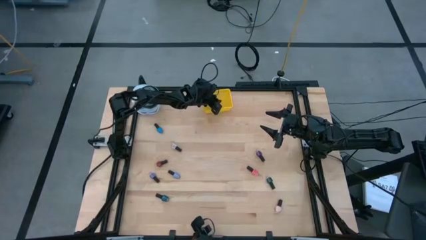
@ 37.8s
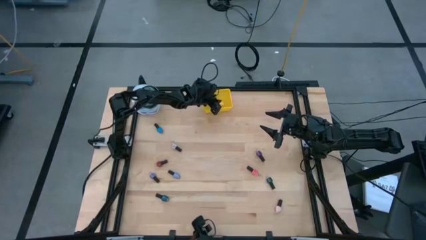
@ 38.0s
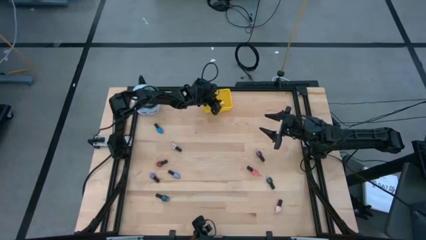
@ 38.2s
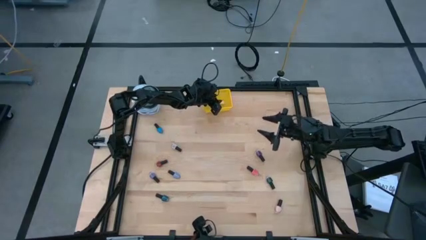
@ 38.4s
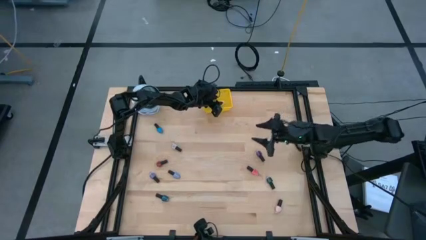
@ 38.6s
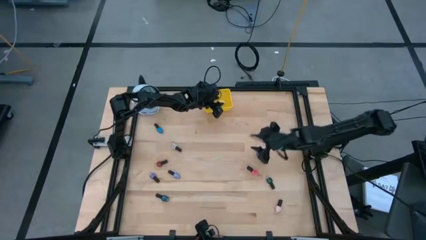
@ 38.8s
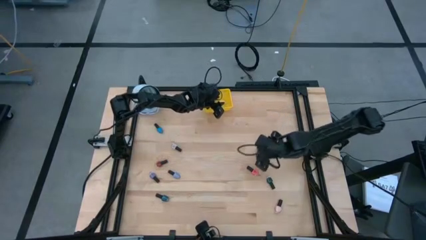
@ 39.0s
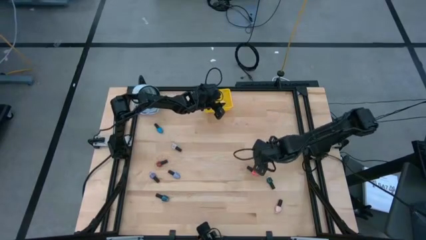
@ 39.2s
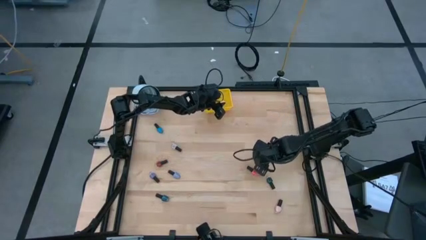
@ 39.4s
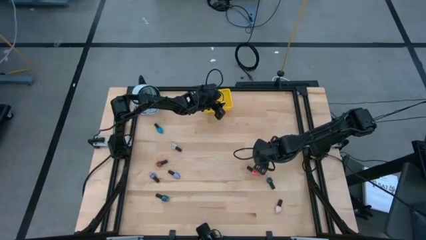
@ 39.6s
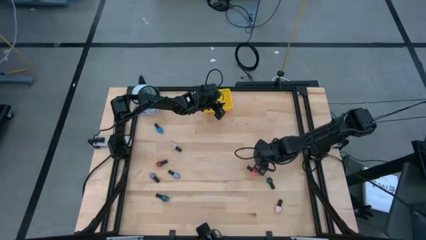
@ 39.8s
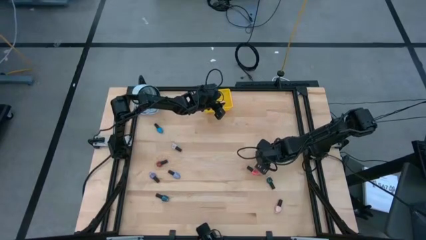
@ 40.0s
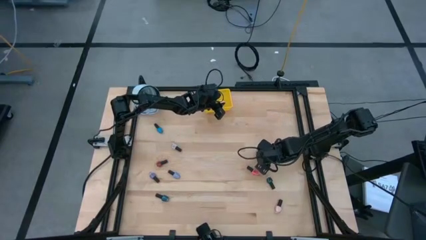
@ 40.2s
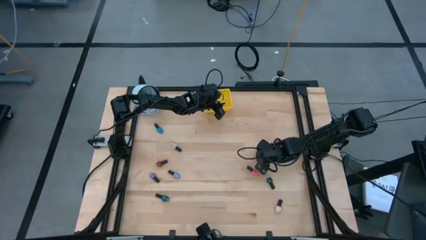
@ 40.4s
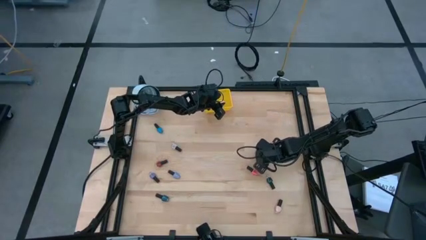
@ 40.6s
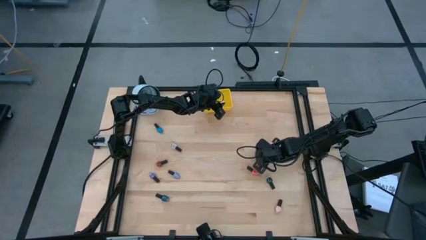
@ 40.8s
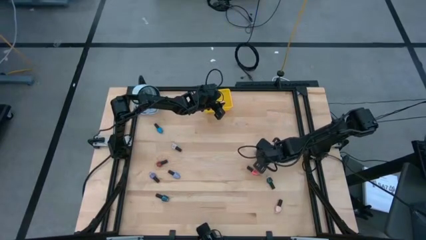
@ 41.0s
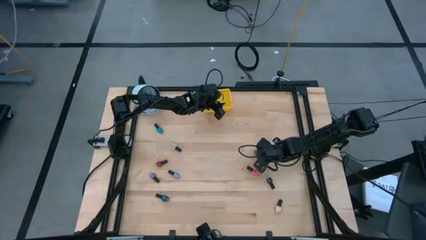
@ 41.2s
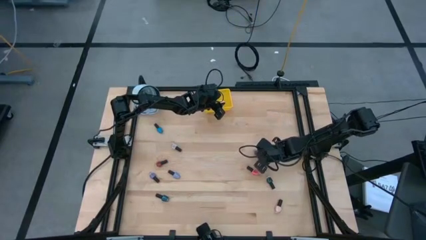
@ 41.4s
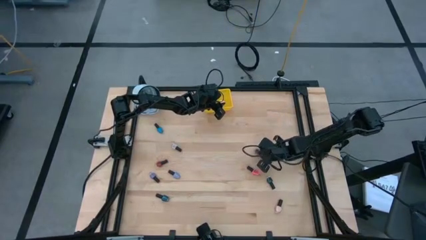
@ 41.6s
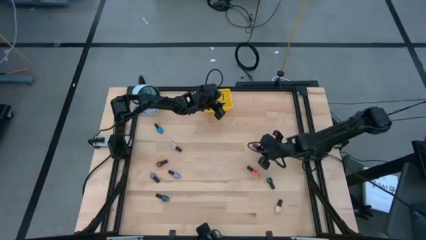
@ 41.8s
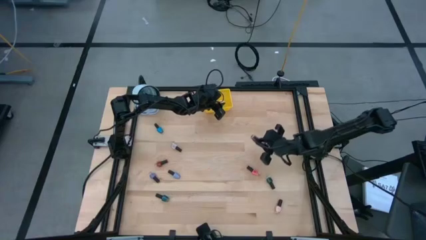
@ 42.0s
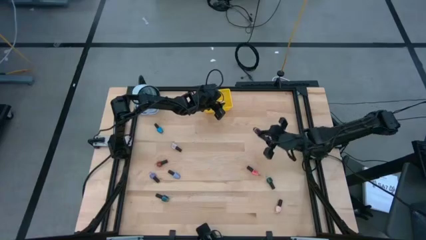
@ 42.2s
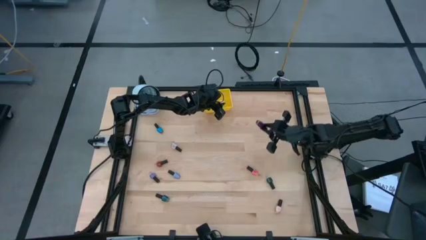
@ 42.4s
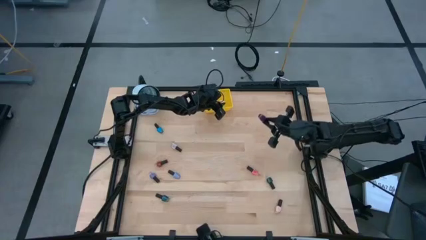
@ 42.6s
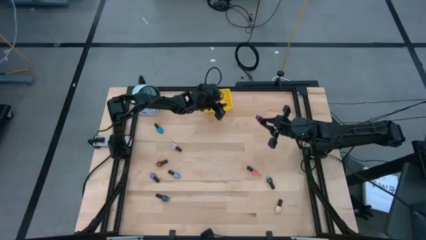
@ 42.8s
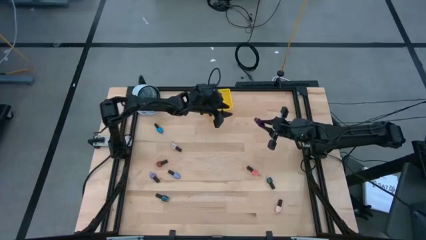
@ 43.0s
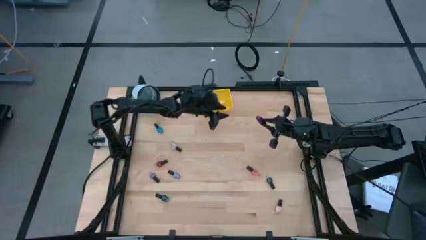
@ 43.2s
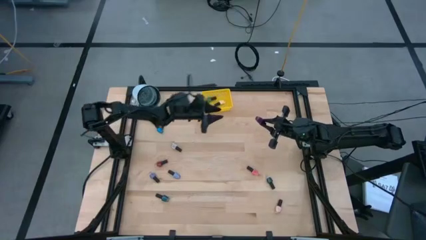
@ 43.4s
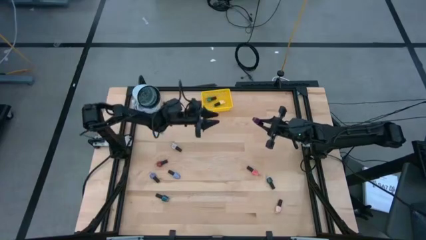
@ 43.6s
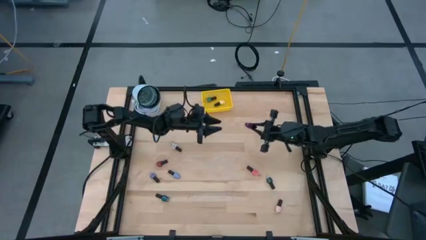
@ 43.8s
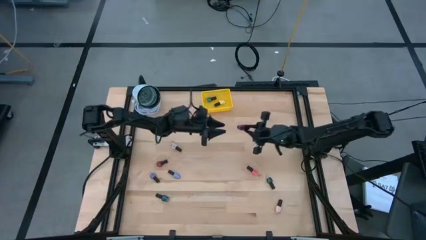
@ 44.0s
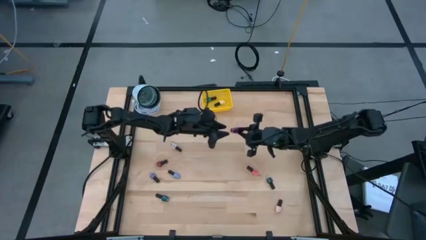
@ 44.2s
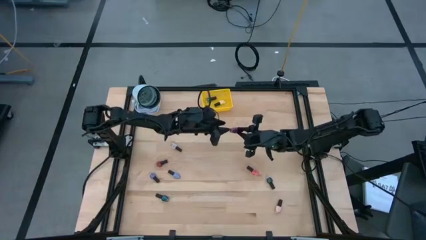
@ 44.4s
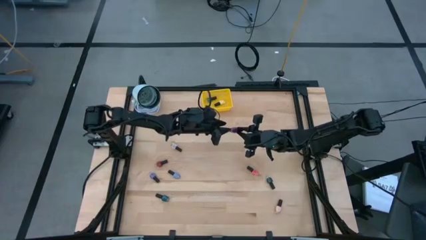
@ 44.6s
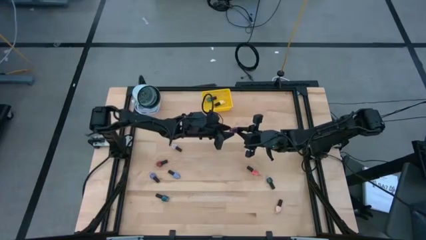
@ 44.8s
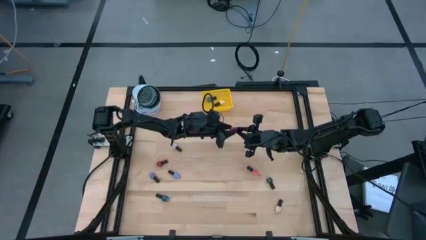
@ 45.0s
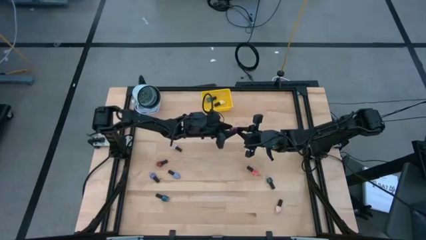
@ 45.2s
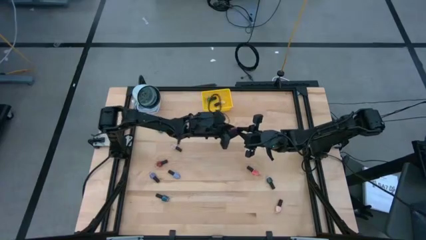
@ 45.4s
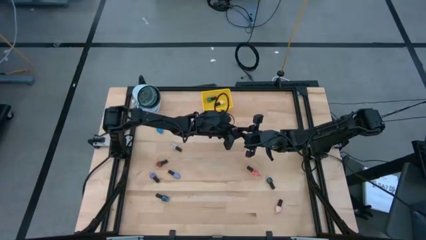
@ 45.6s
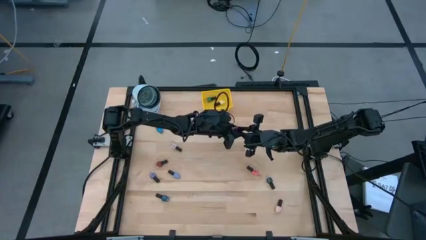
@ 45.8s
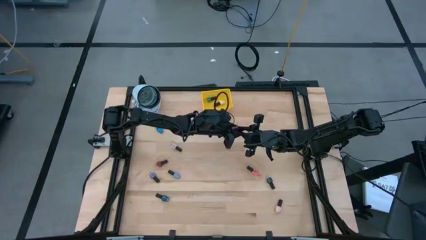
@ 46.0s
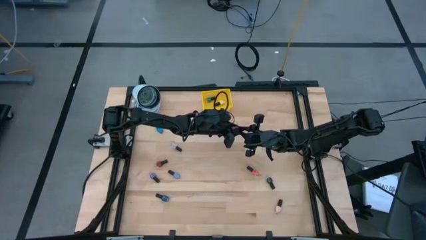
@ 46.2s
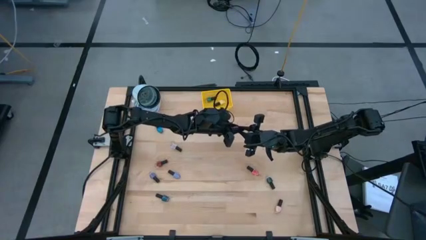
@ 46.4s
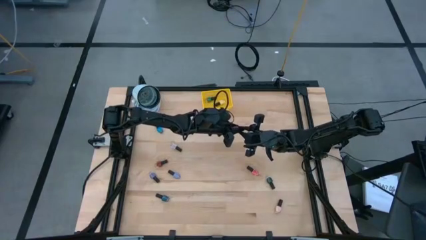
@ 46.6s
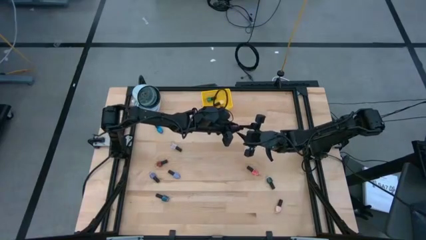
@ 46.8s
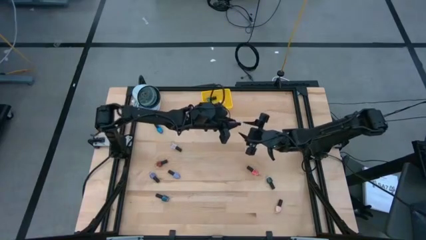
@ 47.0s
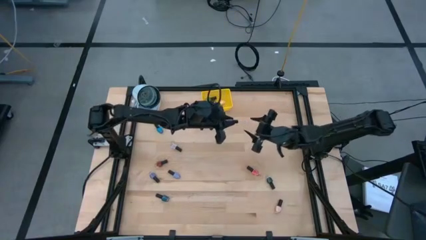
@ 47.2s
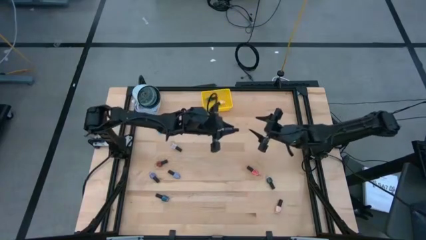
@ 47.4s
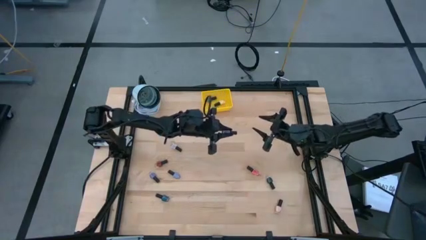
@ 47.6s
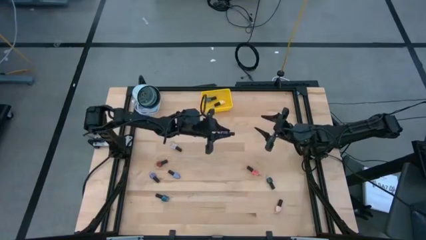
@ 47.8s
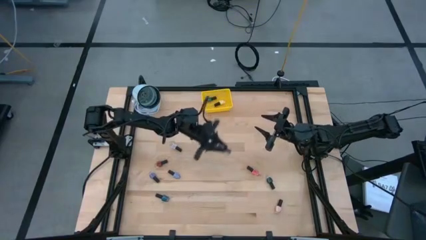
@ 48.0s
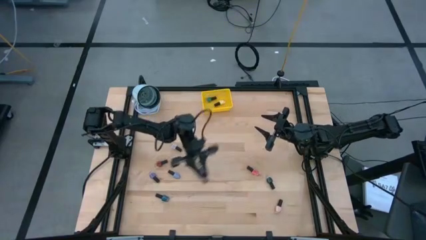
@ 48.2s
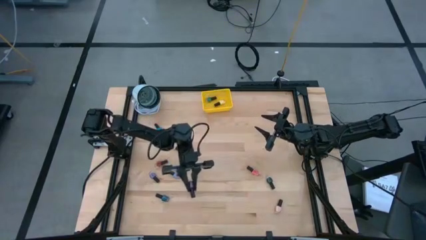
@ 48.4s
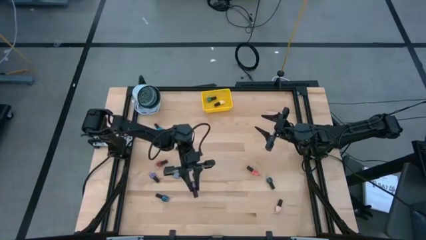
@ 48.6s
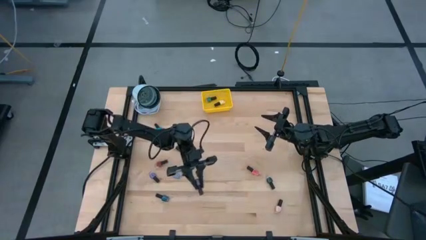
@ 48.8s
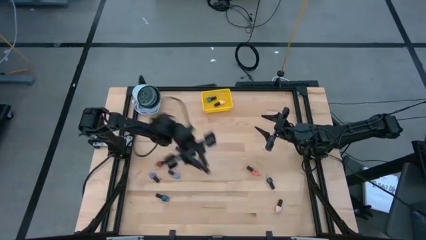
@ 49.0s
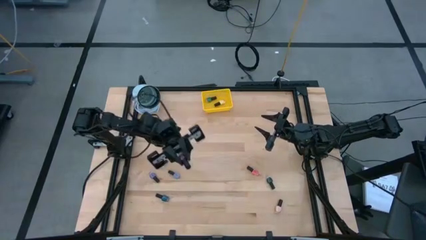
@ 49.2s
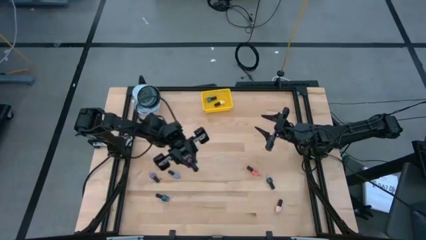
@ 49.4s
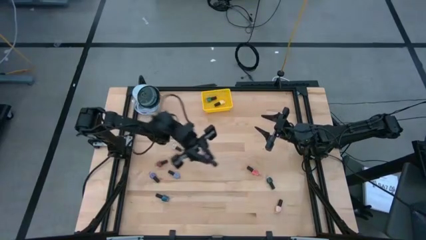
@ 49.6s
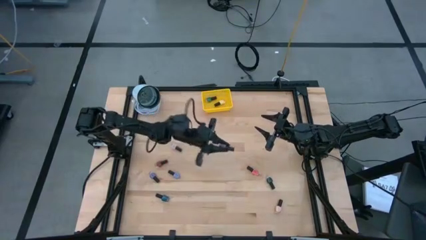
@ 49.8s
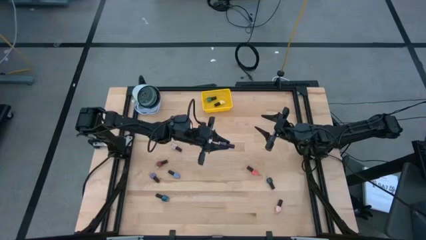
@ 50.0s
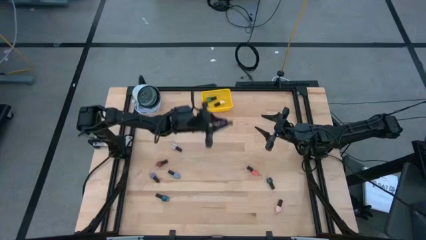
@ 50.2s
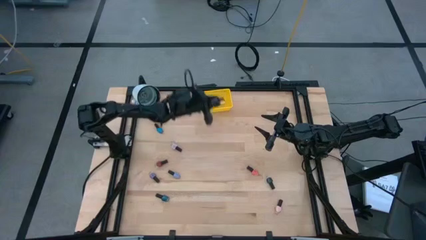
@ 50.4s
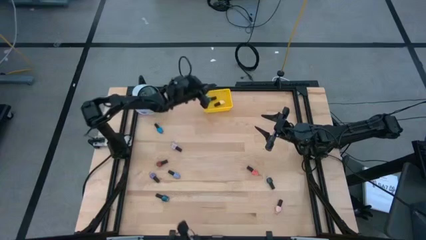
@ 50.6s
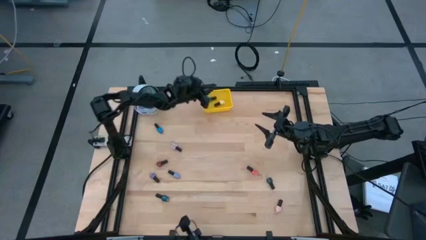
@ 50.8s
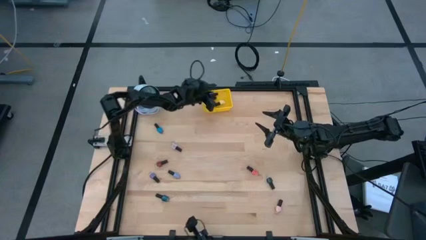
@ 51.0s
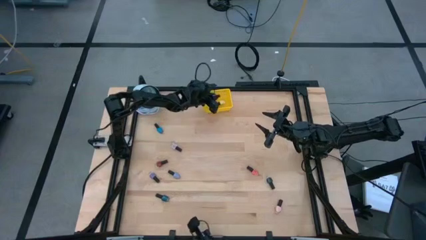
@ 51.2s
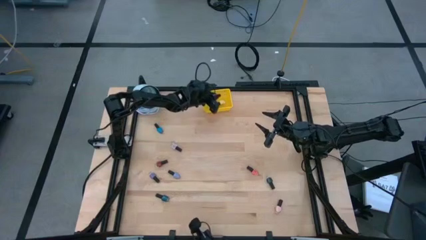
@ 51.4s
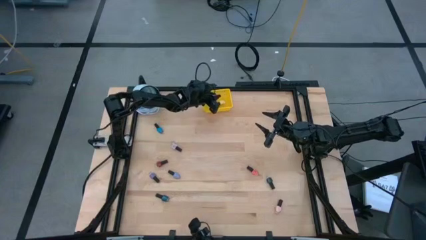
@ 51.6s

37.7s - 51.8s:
Task: Pick & Place Nail Polish
Put the right purple nail polish bottle into the yellow bin
